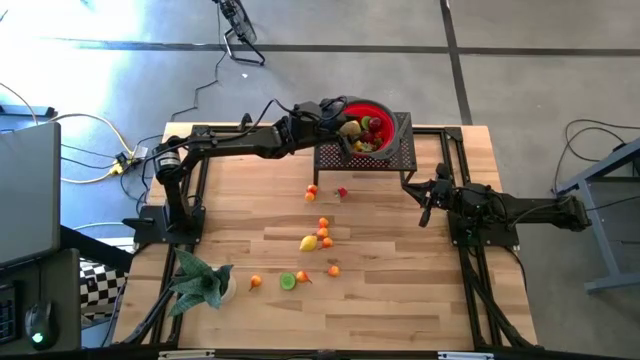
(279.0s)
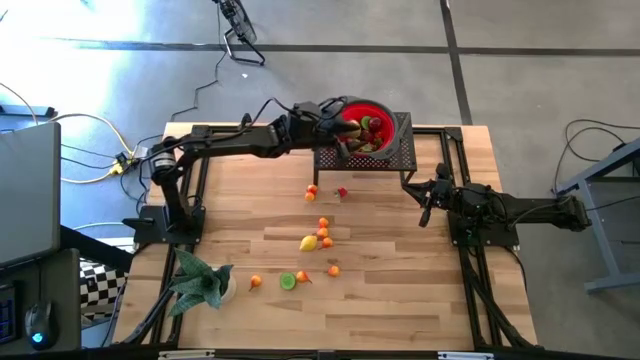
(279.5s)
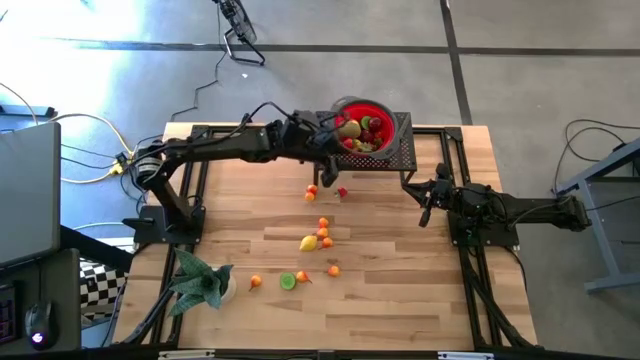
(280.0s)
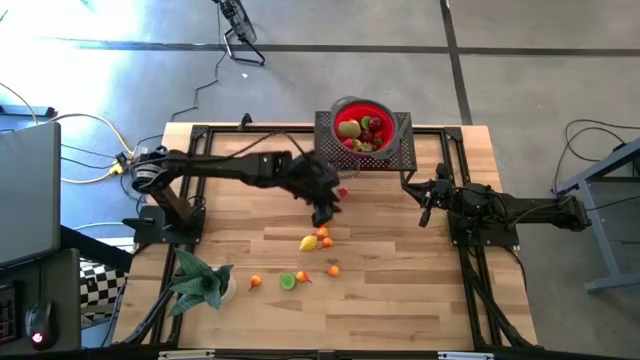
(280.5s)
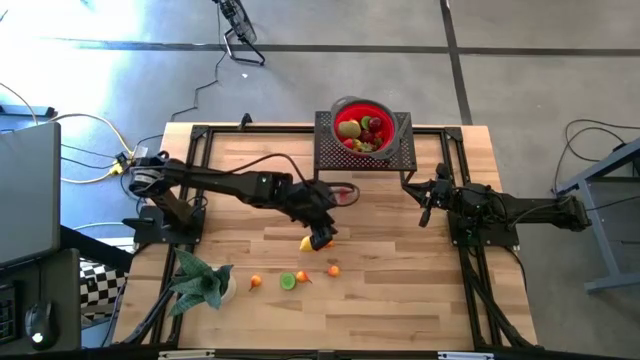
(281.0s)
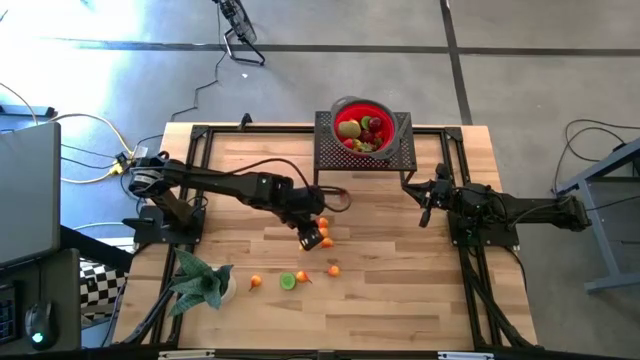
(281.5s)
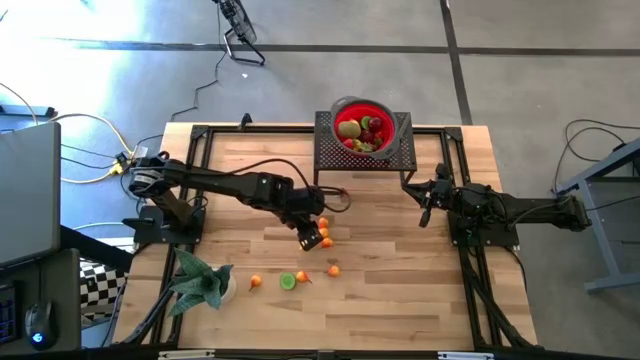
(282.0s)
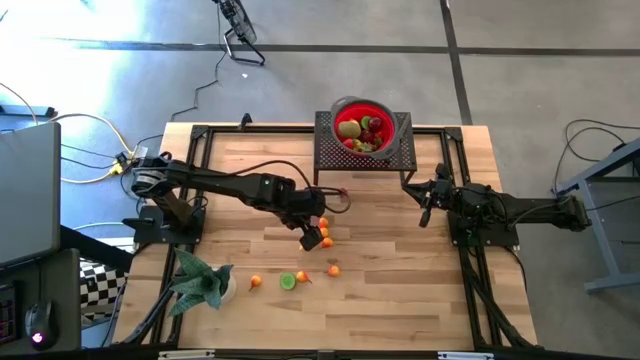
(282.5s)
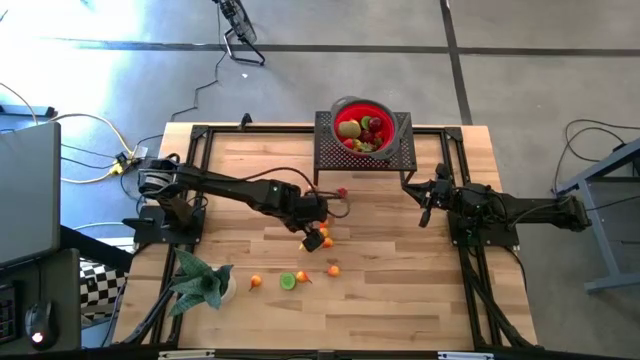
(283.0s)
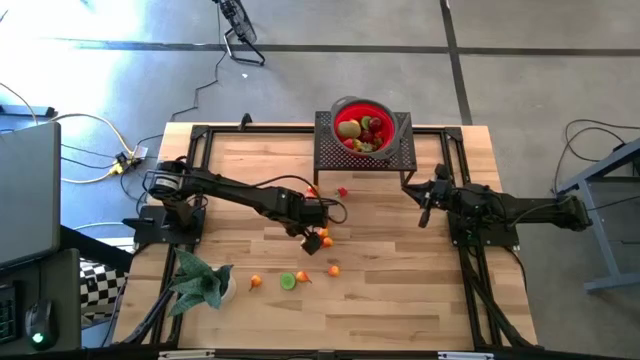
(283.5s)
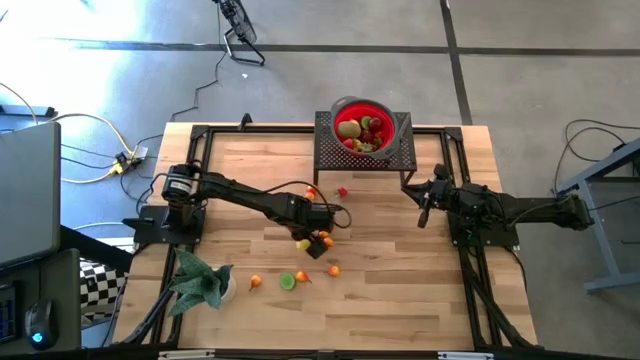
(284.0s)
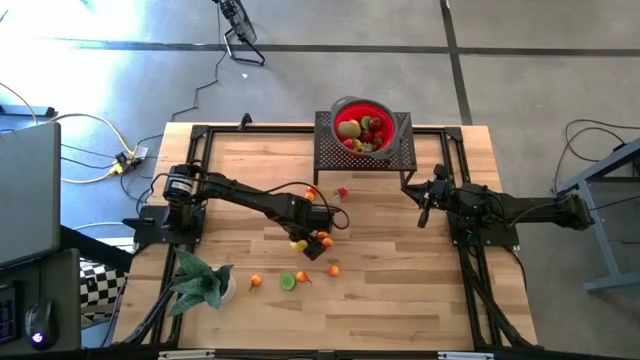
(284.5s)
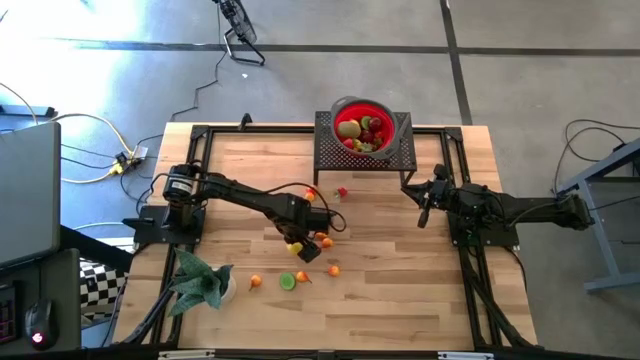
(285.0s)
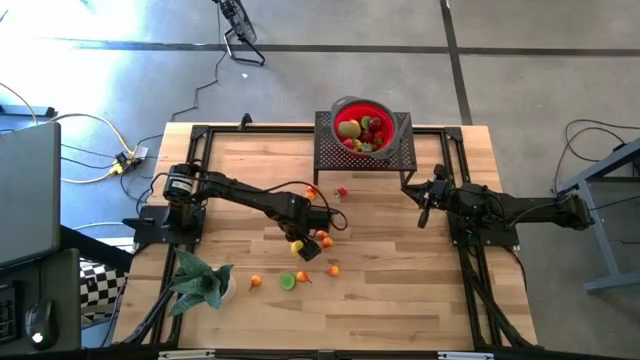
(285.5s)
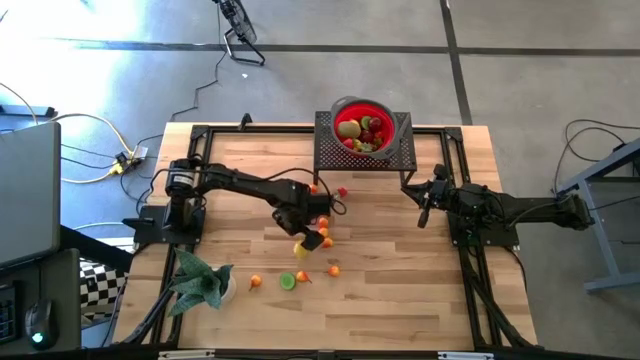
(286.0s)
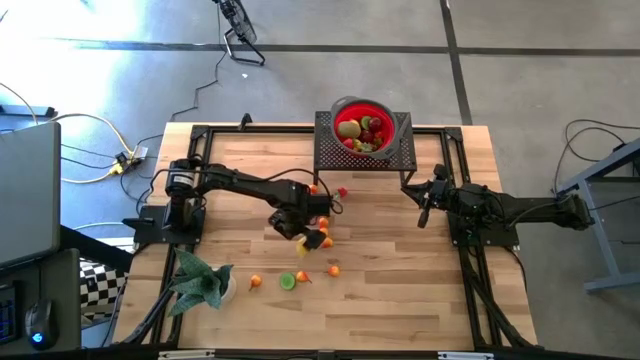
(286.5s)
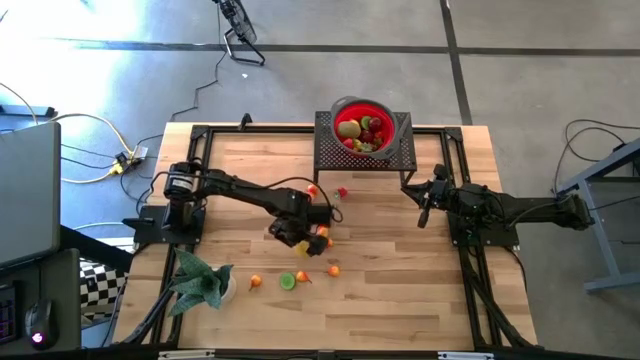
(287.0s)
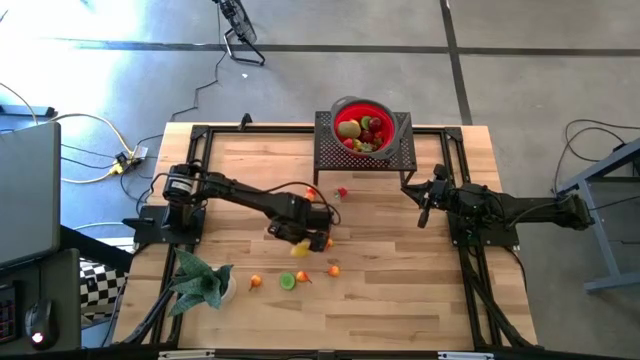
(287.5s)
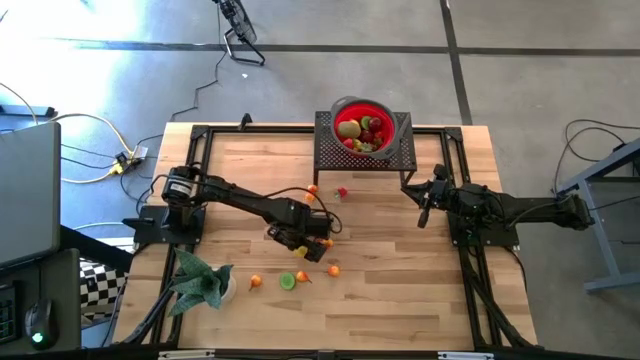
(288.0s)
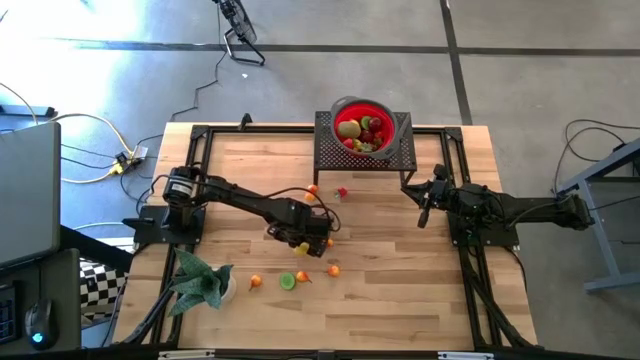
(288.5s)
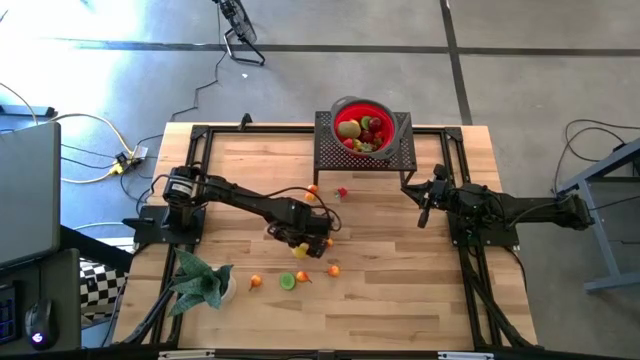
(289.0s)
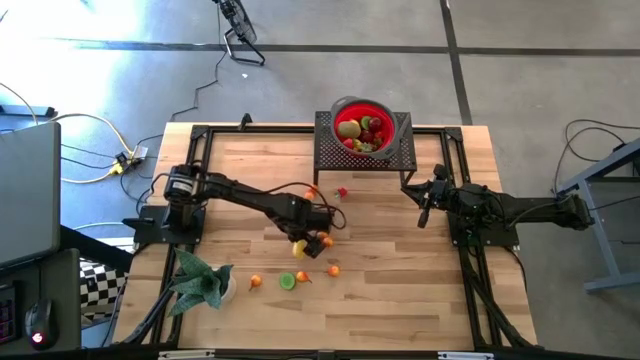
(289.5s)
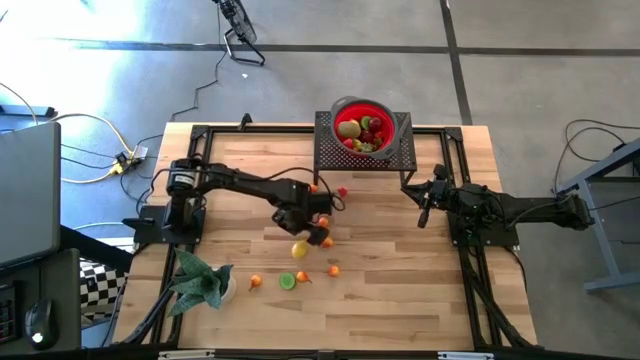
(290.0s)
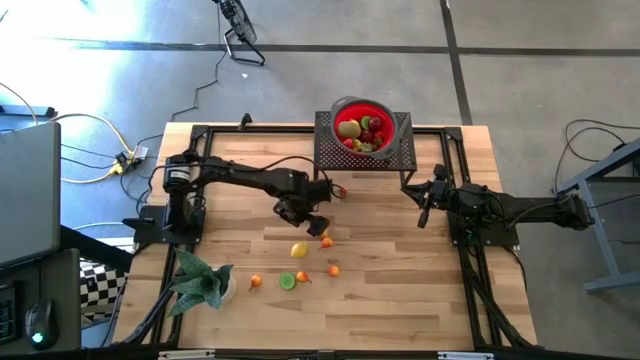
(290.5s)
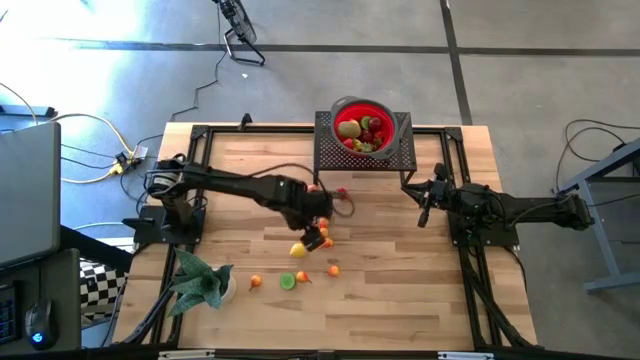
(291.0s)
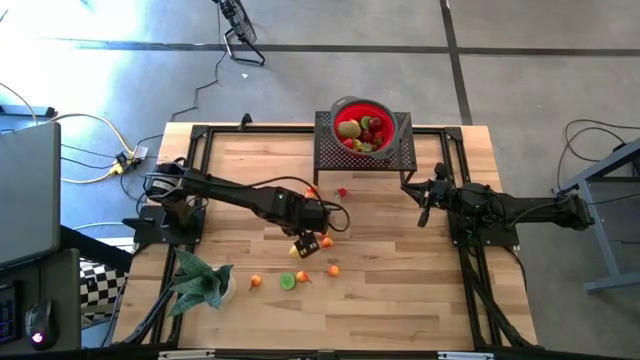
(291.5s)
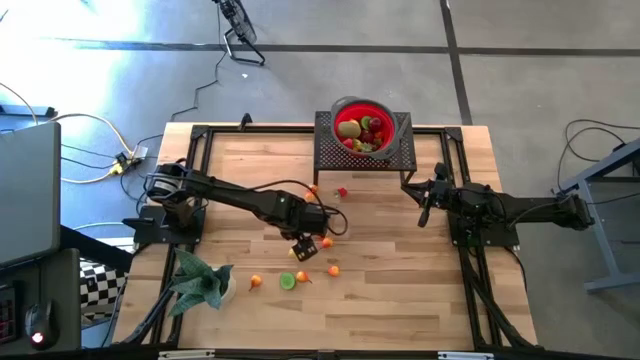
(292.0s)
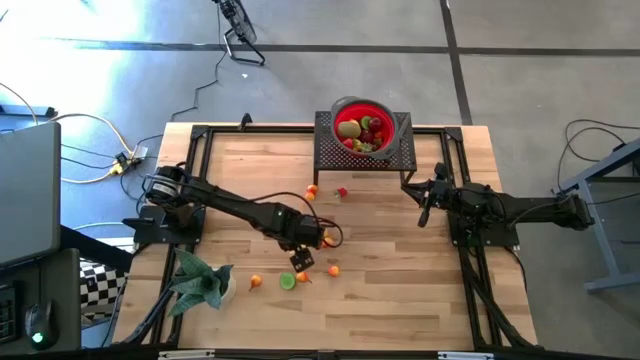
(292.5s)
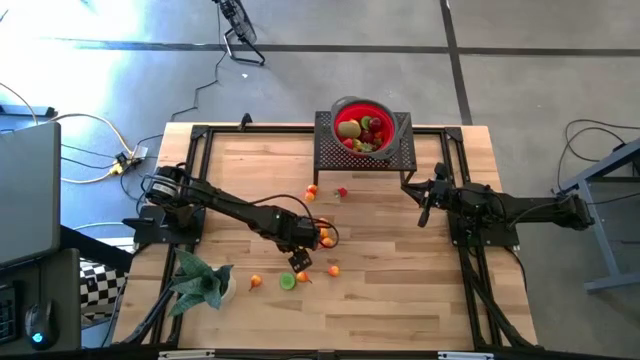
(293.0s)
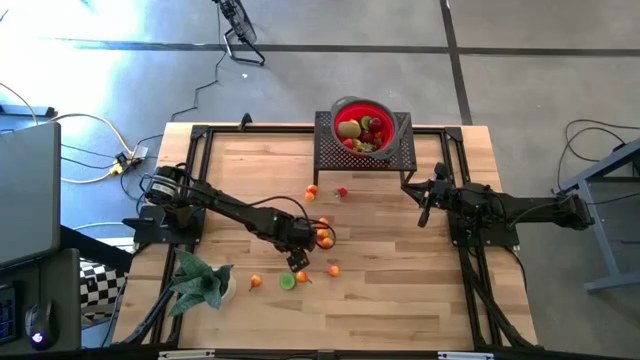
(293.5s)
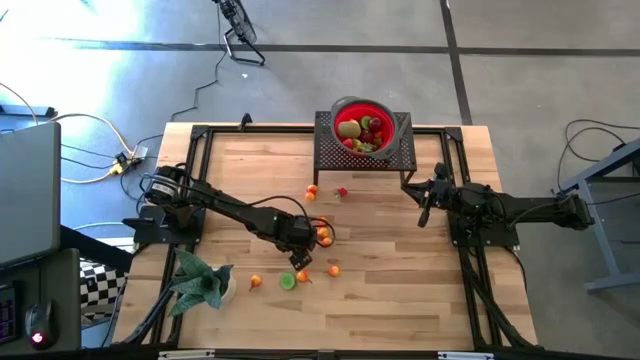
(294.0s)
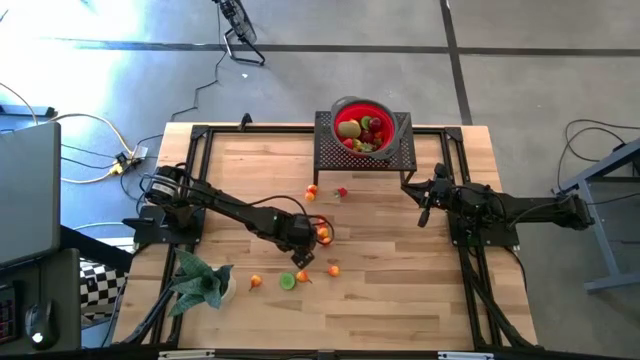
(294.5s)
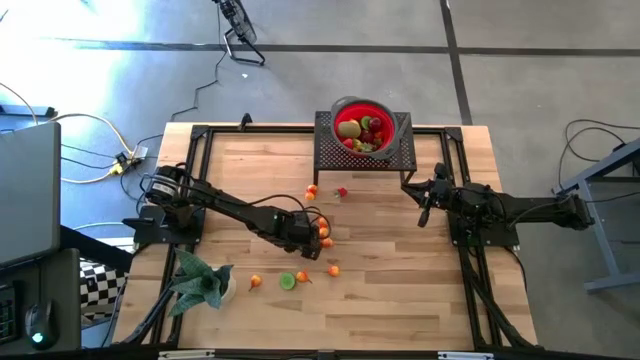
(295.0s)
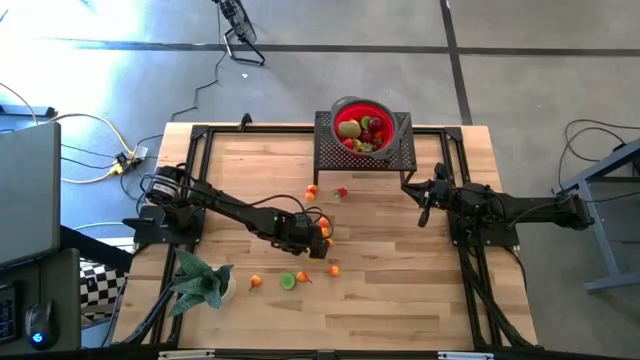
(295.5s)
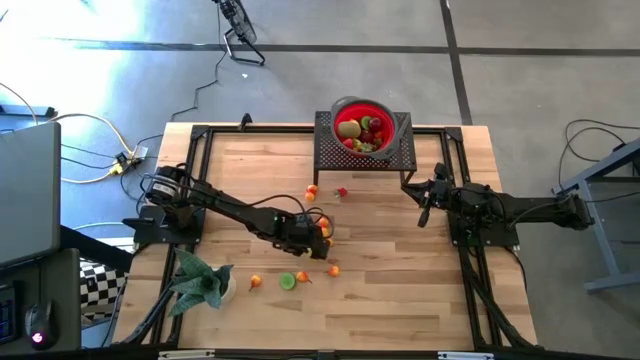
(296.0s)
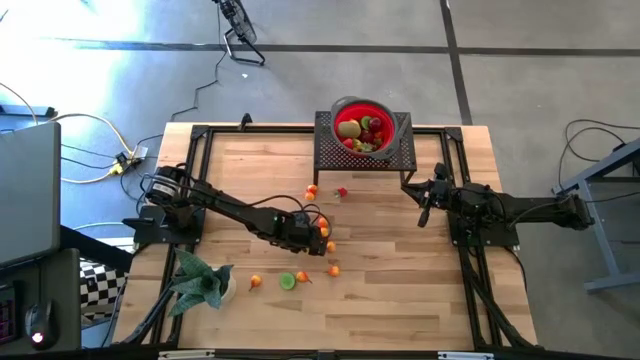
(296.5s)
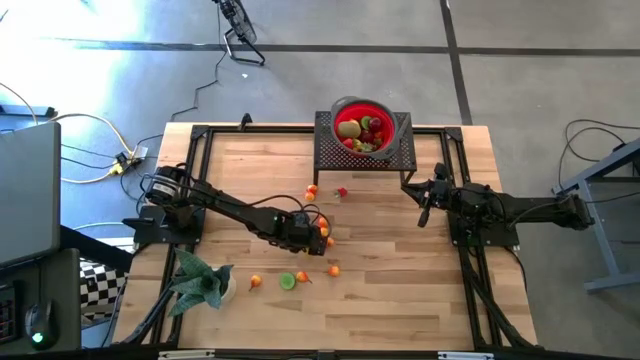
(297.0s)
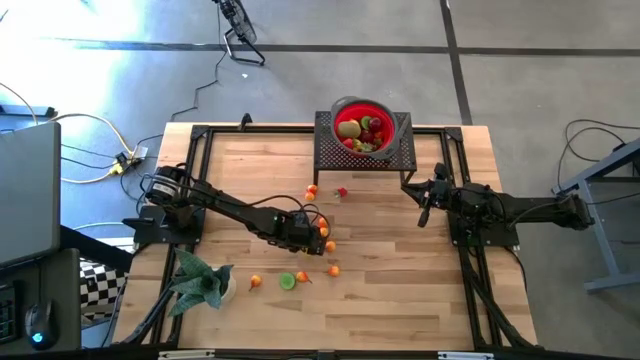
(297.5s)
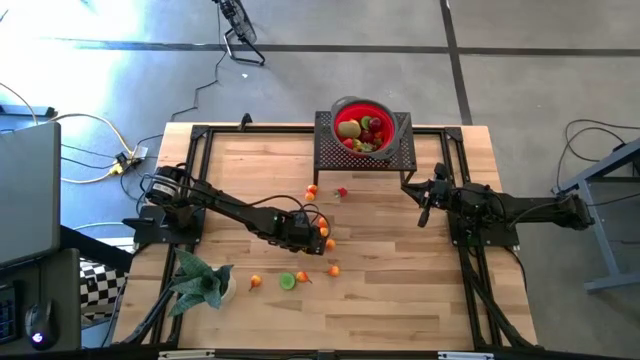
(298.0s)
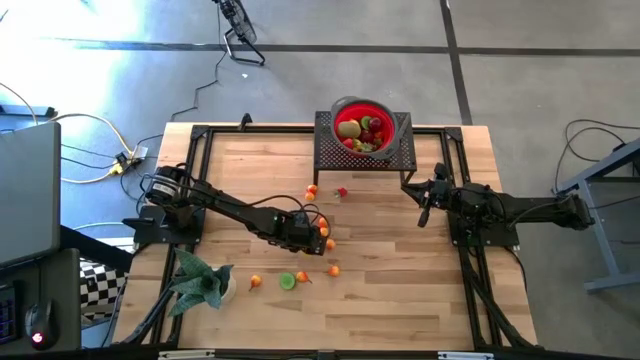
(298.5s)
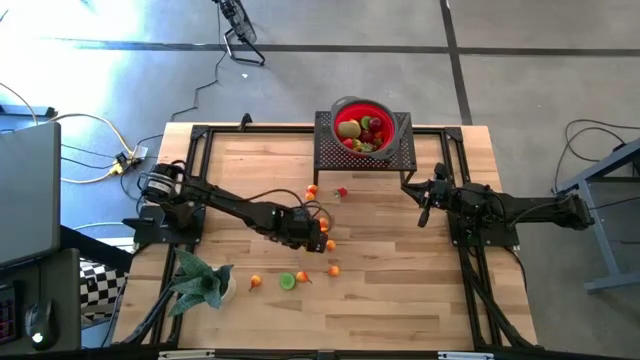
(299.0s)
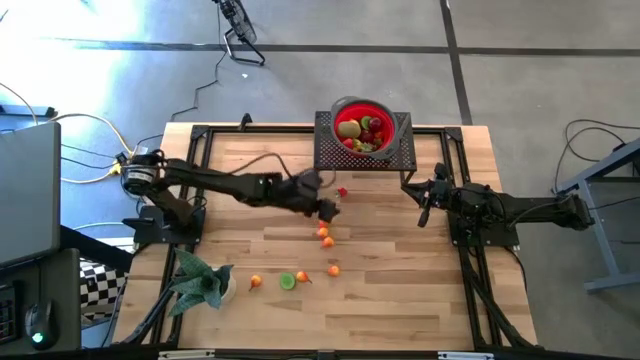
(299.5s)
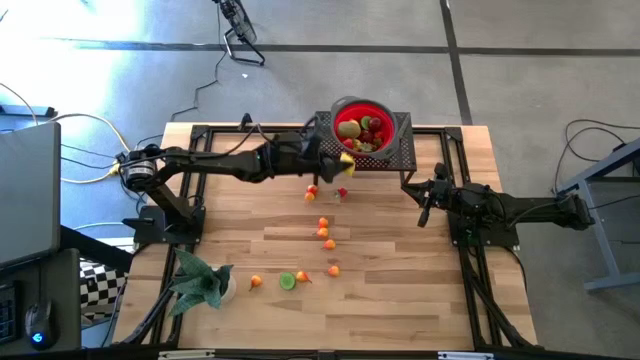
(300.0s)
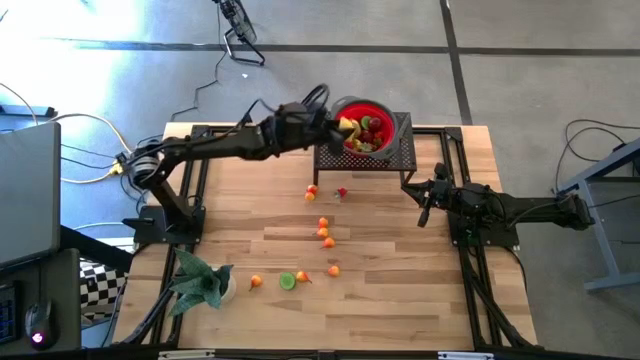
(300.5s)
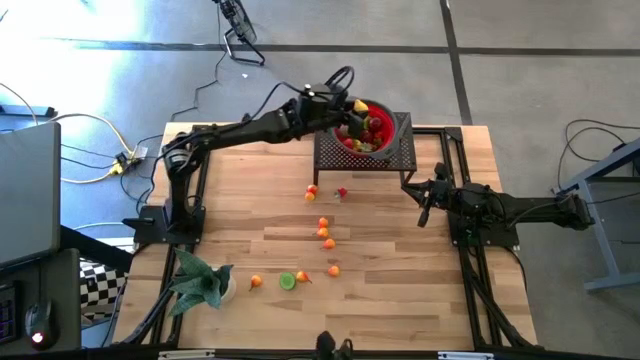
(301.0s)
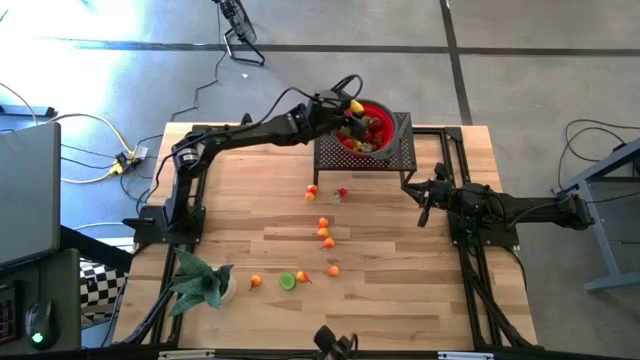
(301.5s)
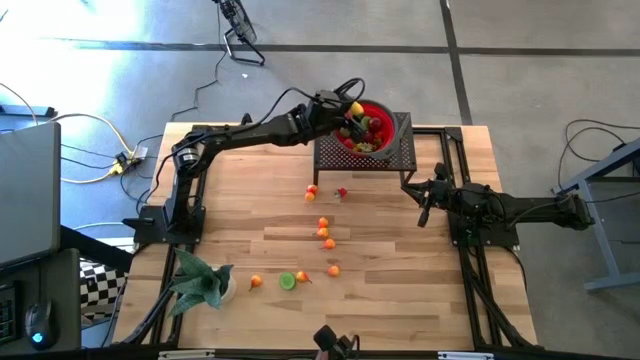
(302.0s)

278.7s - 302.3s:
Task: Pick & Place Fruit
Put the lemon into the strainer on the shelf
